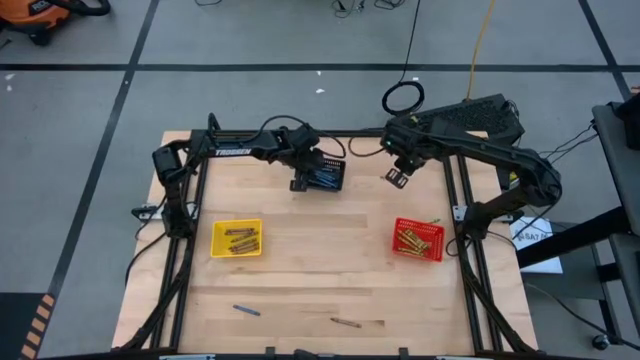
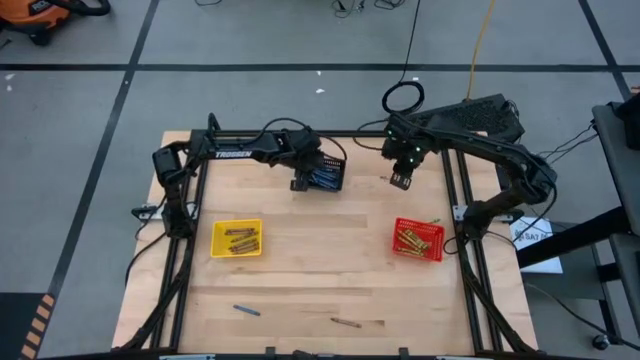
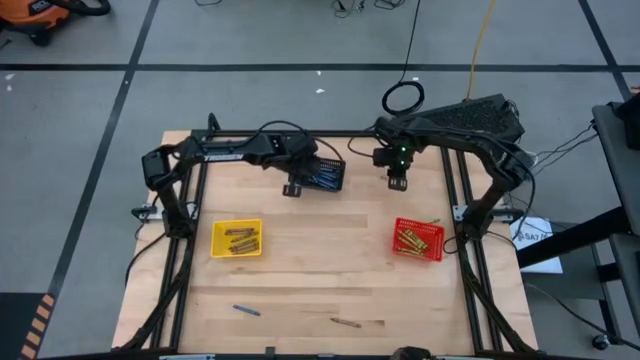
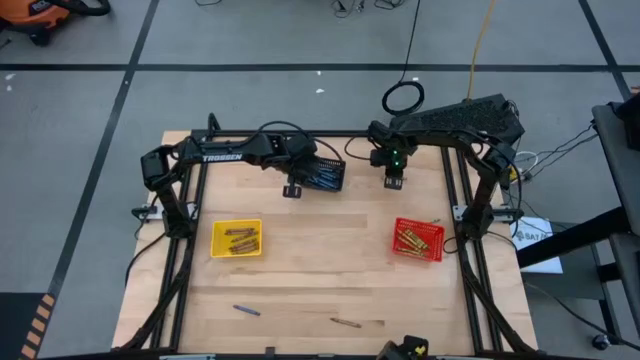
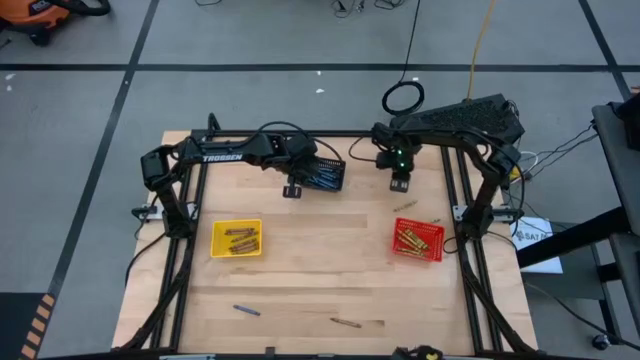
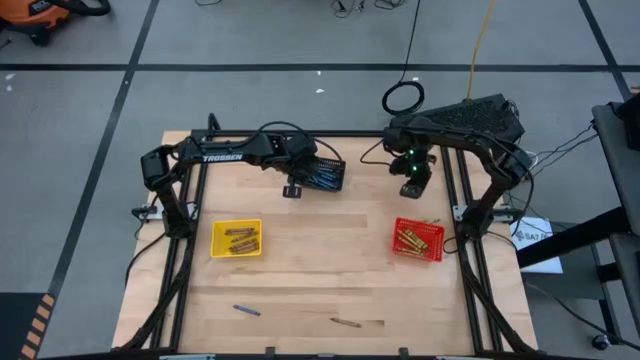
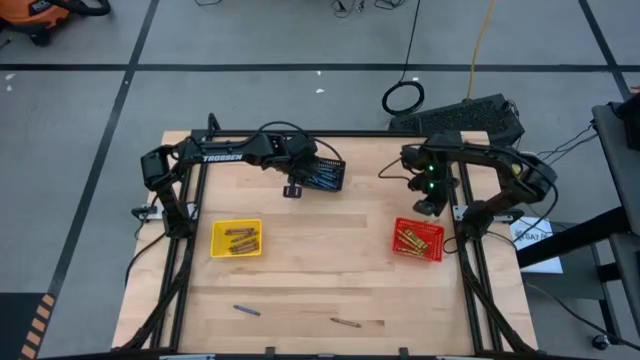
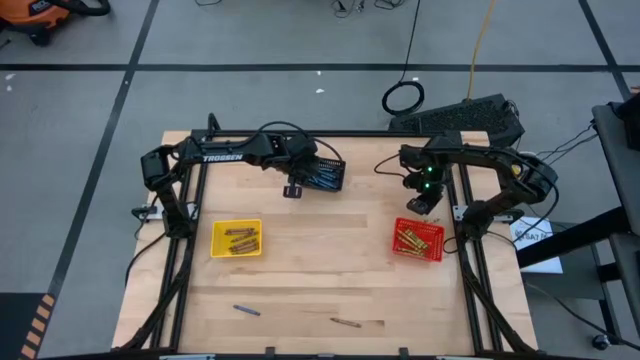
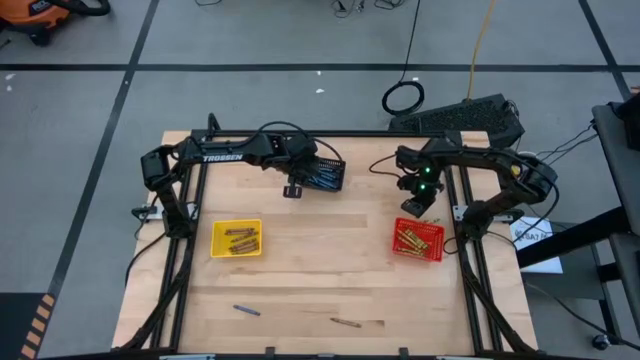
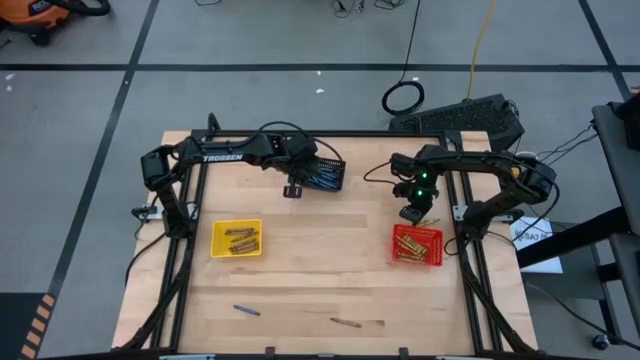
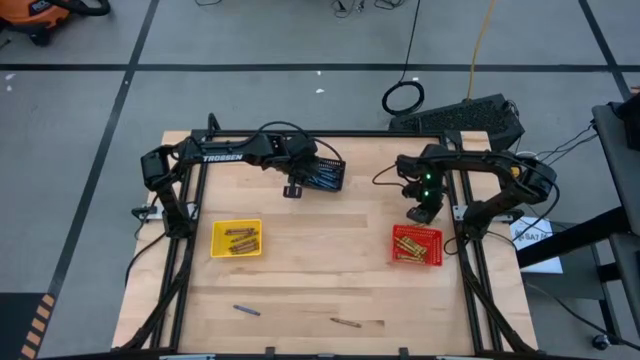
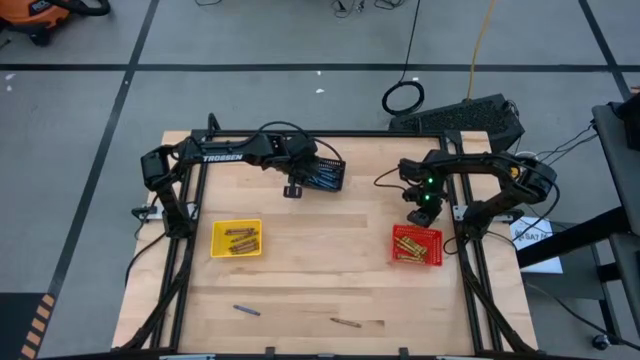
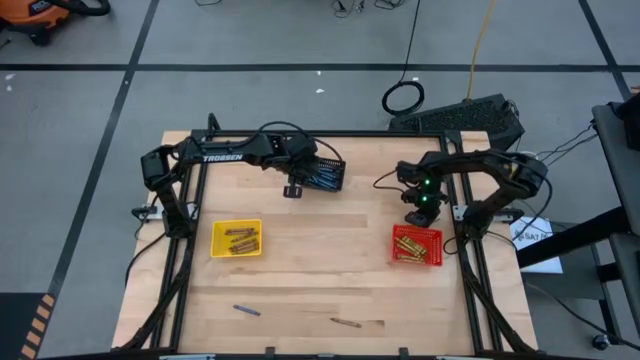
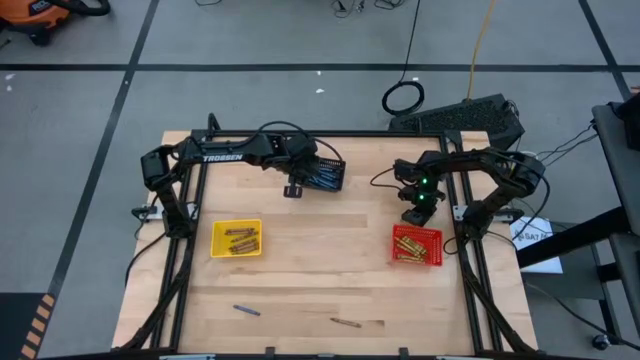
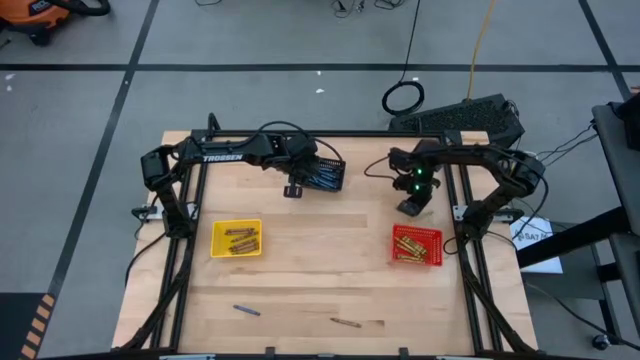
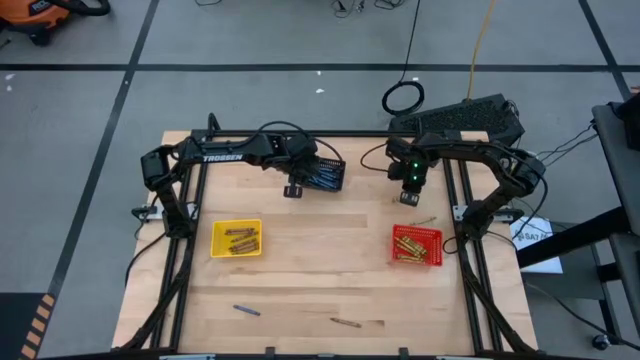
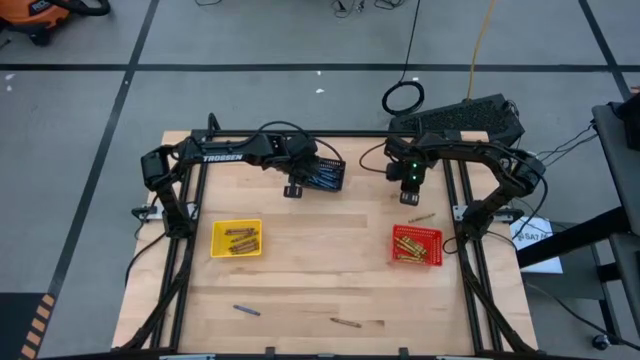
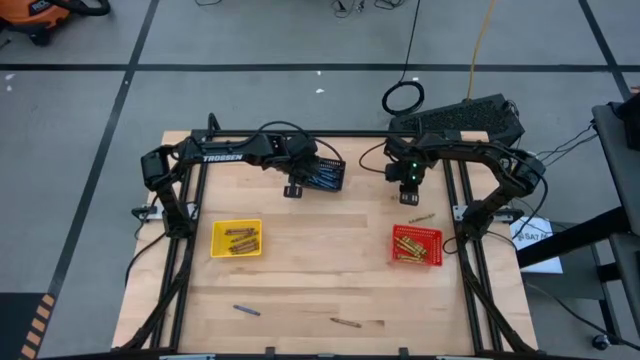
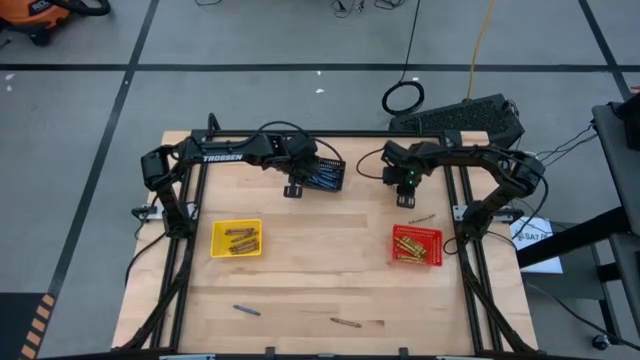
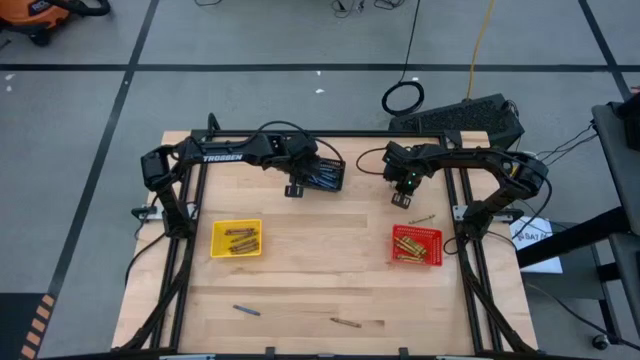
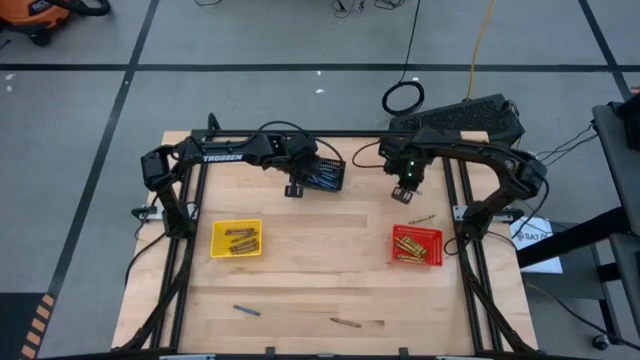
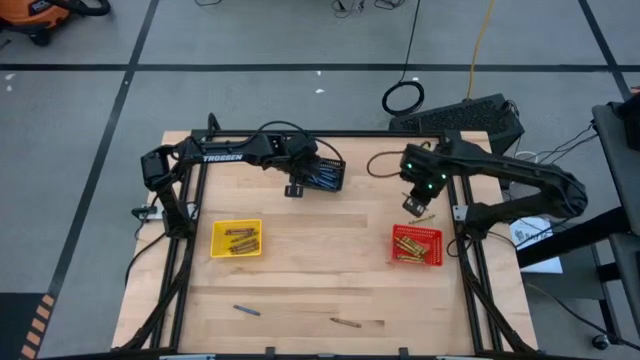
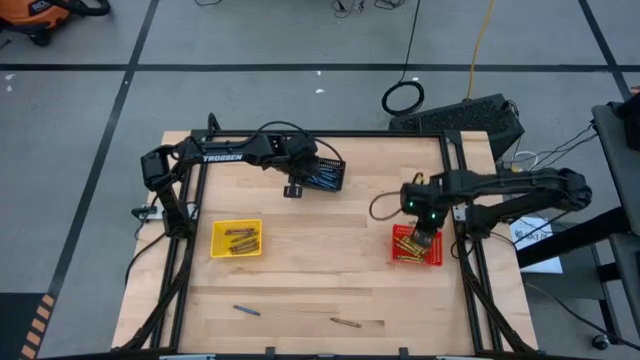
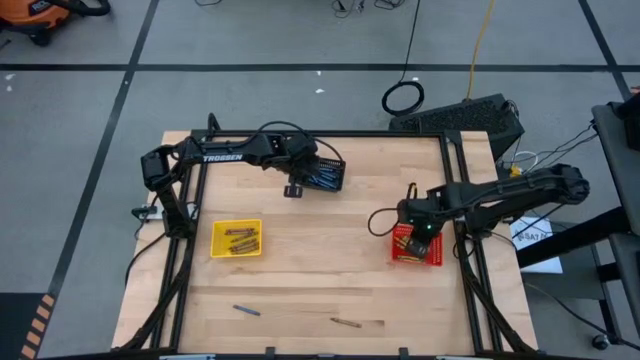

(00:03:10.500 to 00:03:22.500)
Task: Sort crayons
Put the green crayon into the red bin

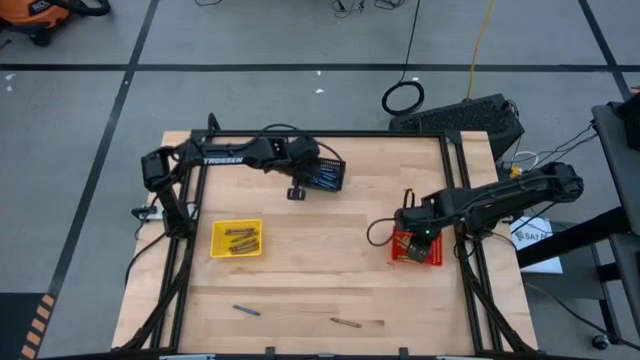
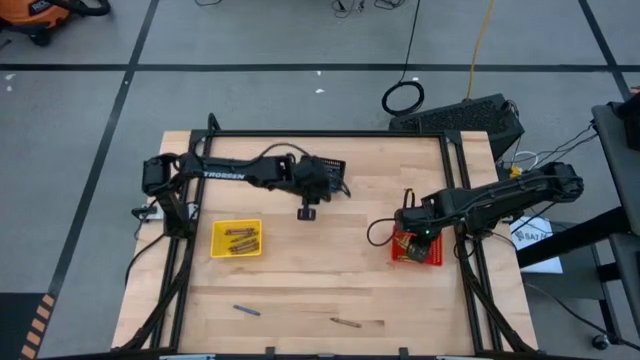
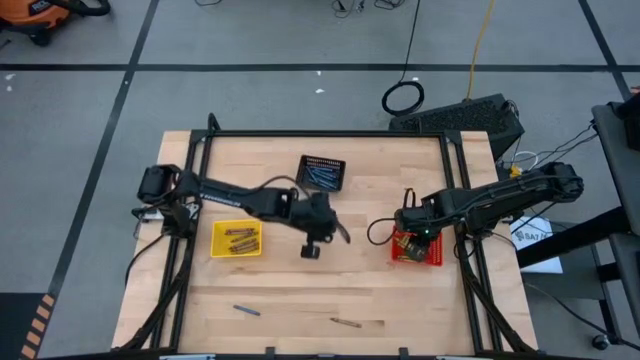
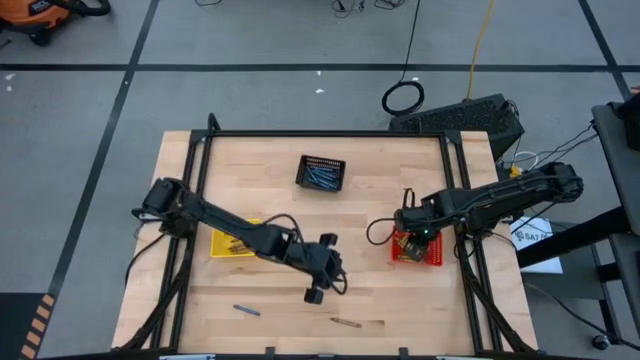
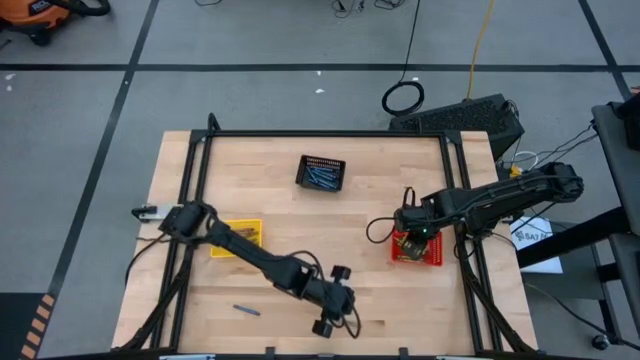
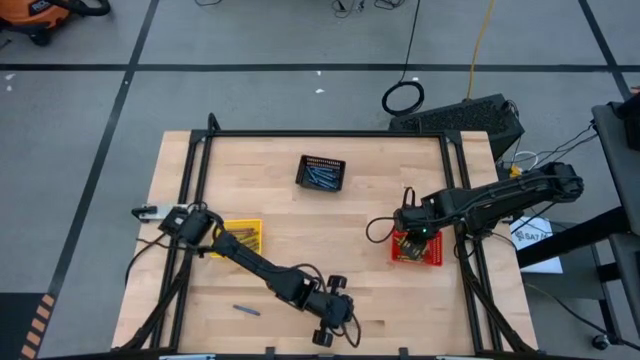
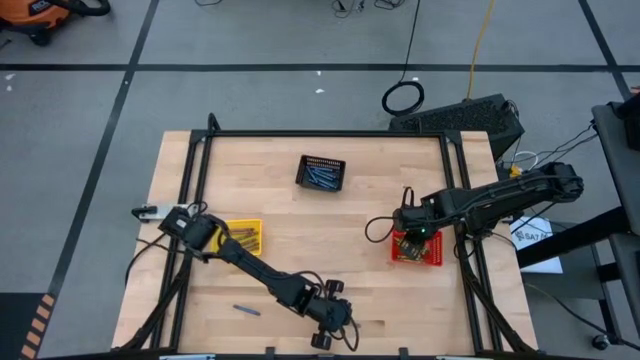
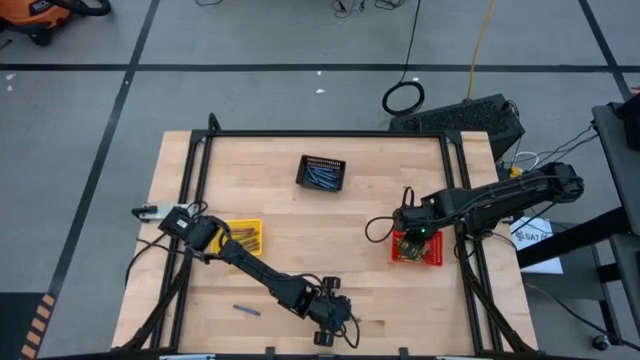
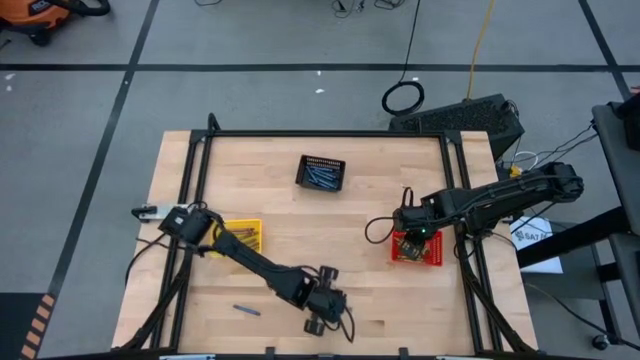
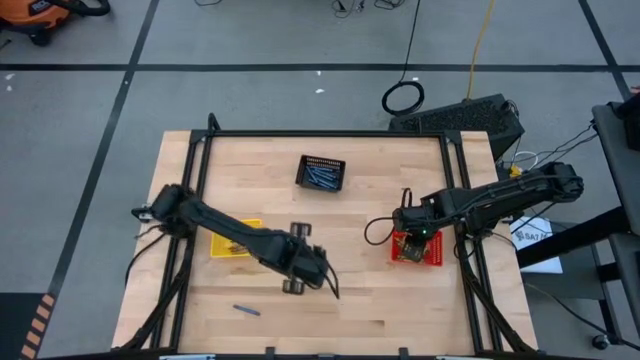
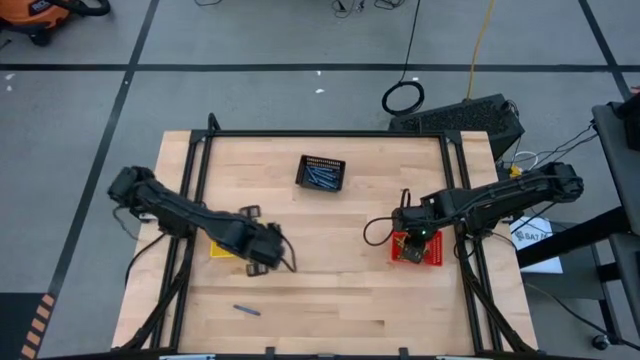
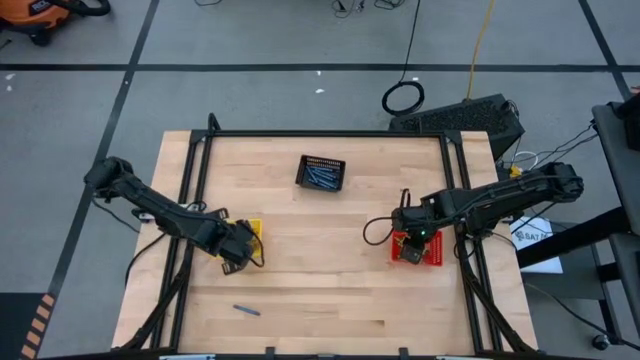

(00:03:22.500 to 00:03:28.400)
Put the brown crayon into the yellow bin

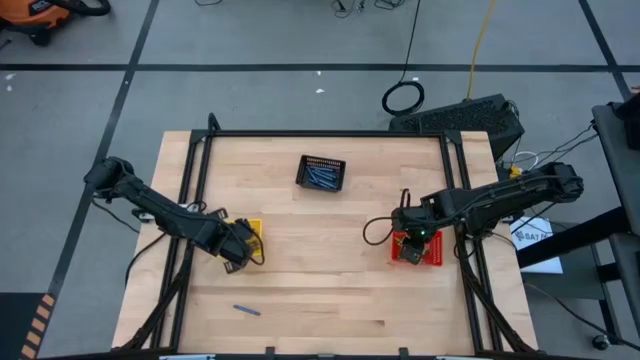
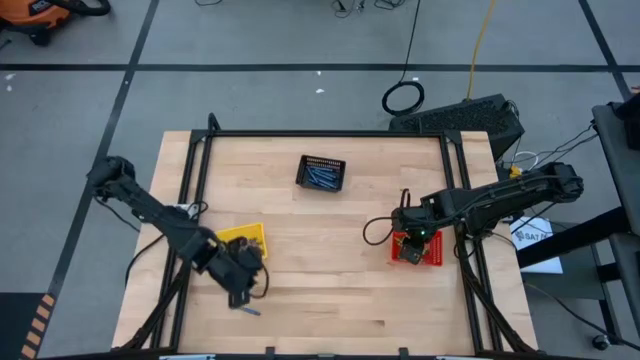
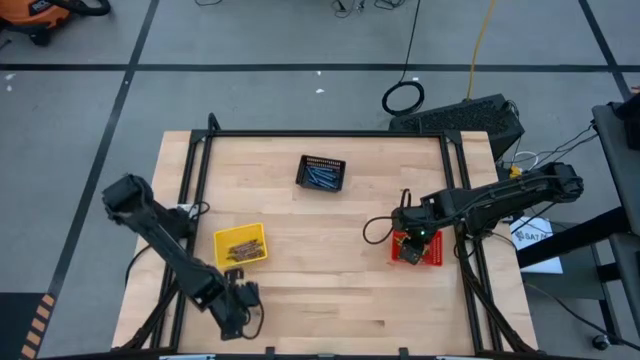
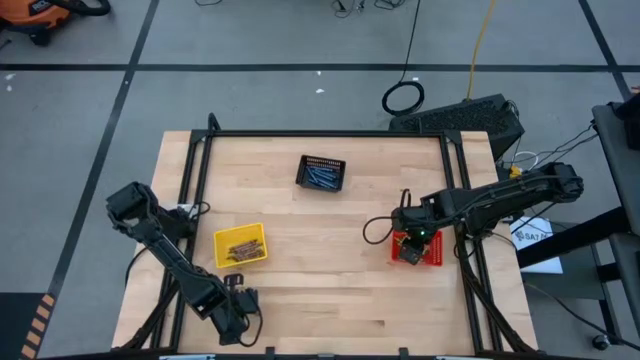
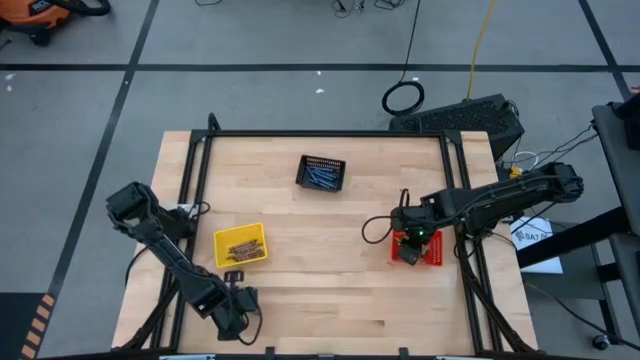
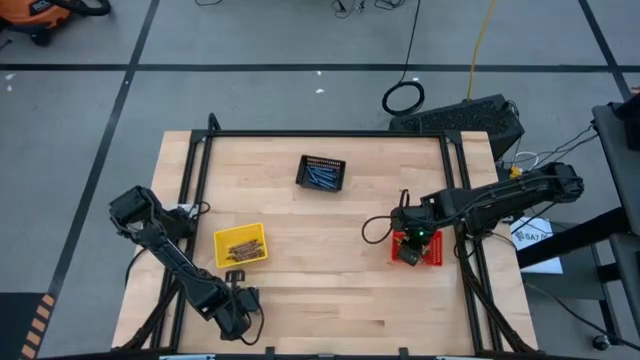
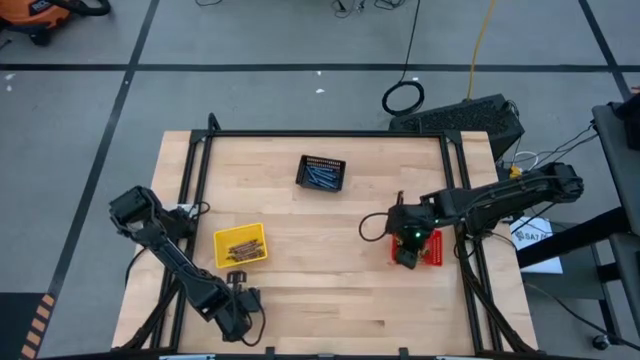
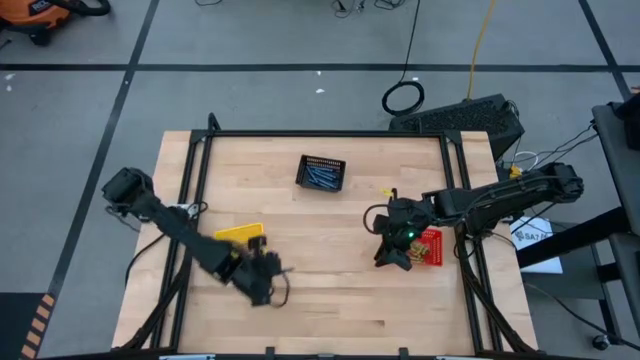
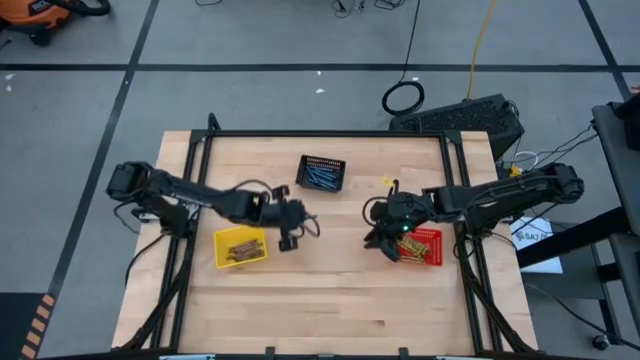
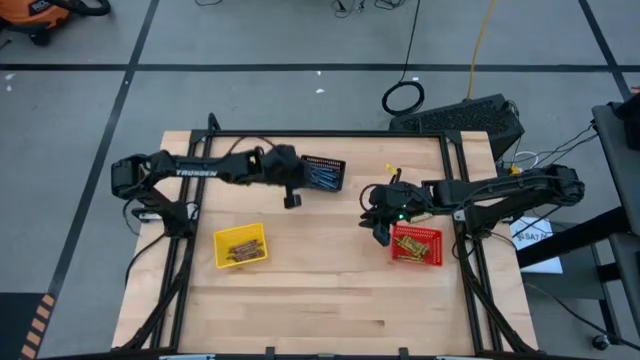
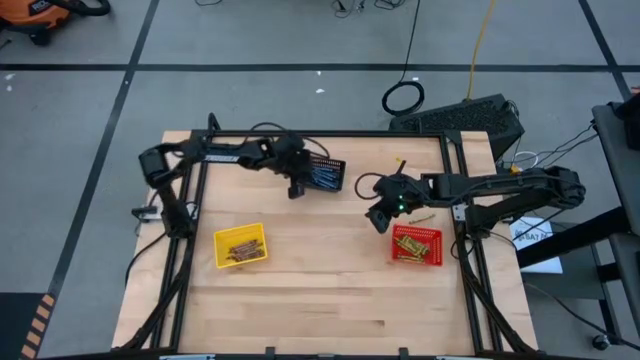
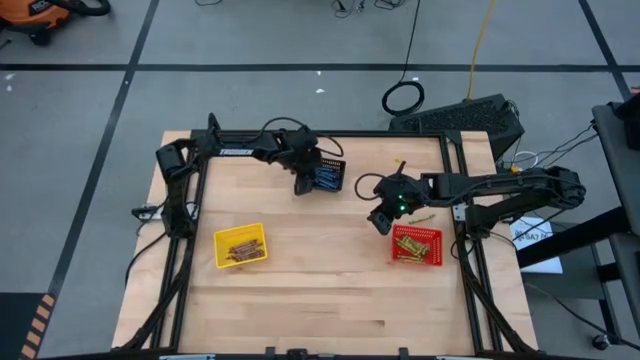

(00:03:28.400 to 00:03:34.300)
Put the blue crayon into the black bin
